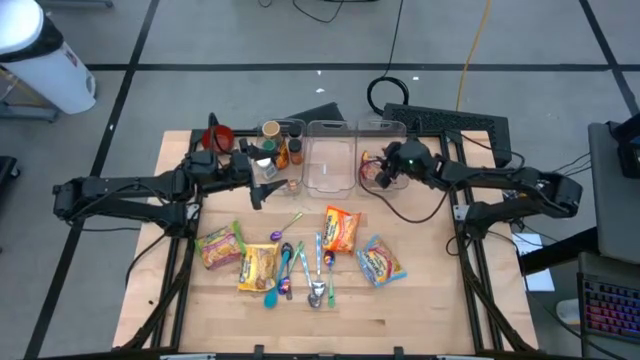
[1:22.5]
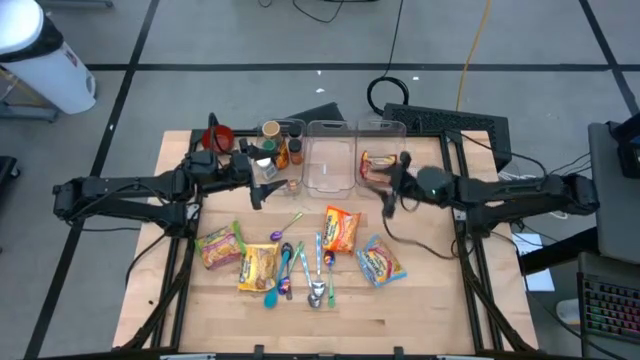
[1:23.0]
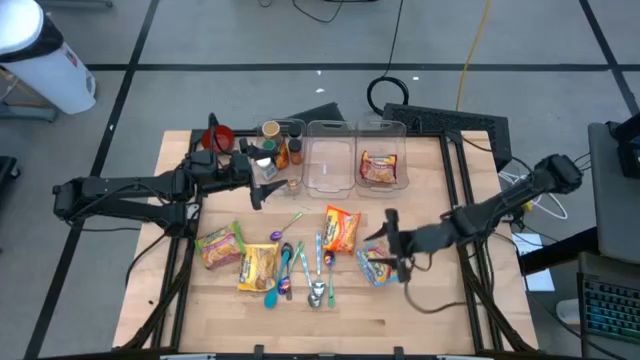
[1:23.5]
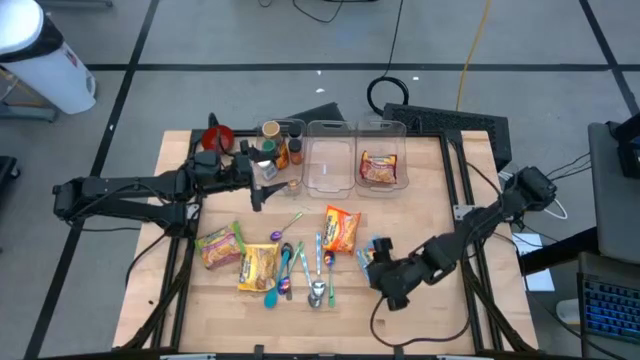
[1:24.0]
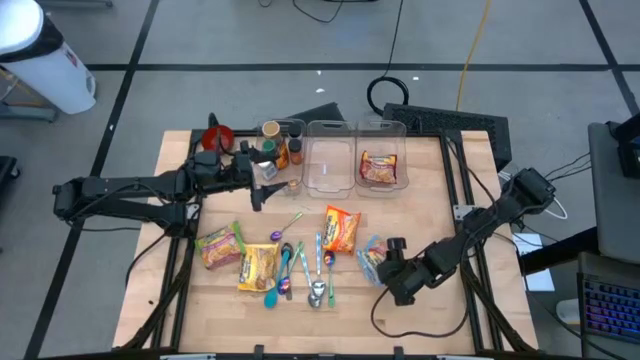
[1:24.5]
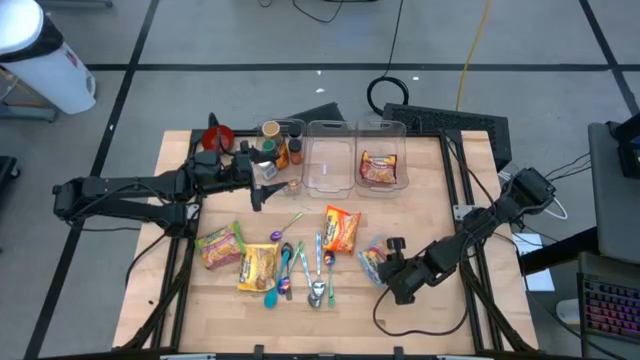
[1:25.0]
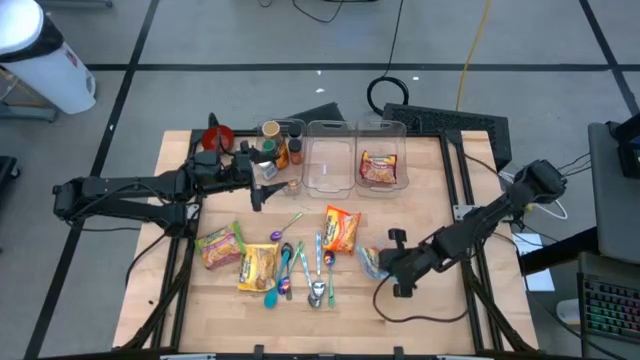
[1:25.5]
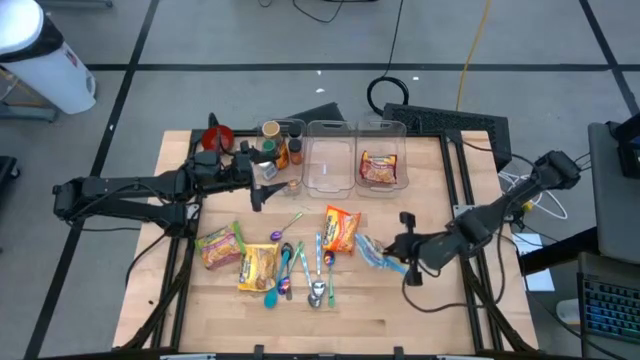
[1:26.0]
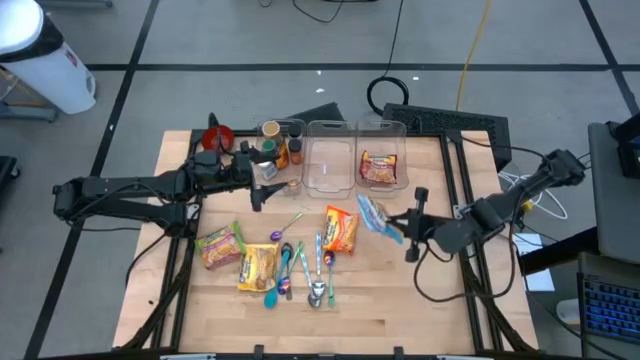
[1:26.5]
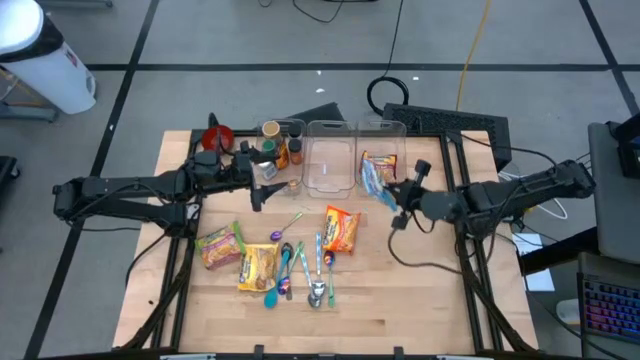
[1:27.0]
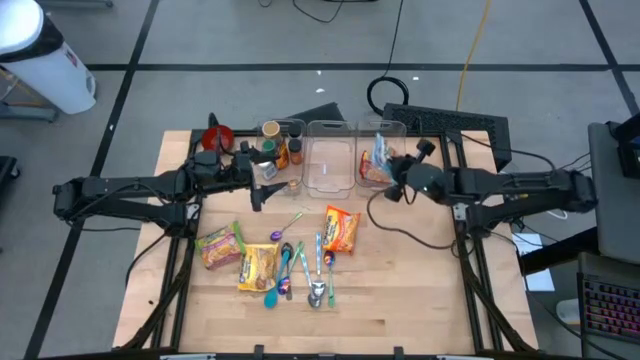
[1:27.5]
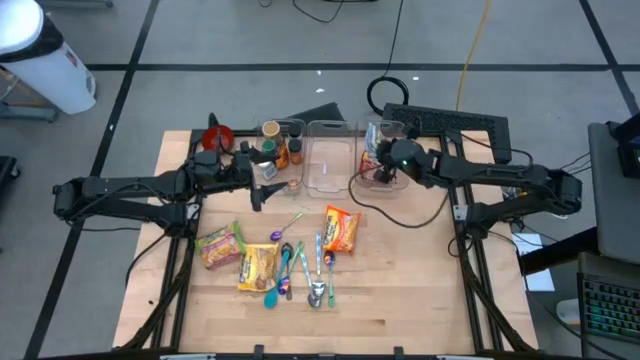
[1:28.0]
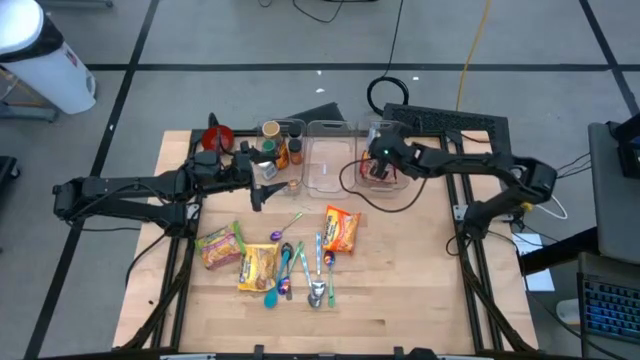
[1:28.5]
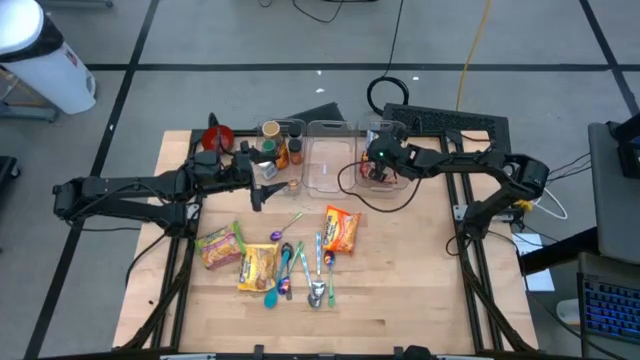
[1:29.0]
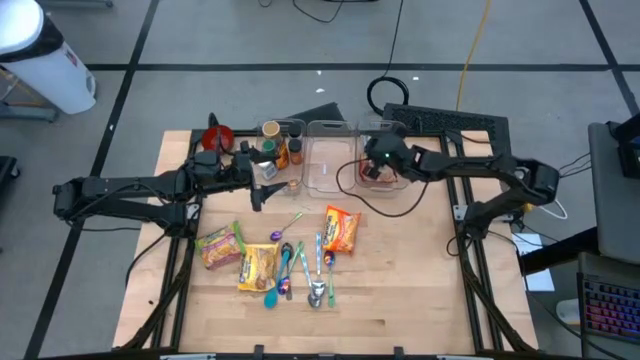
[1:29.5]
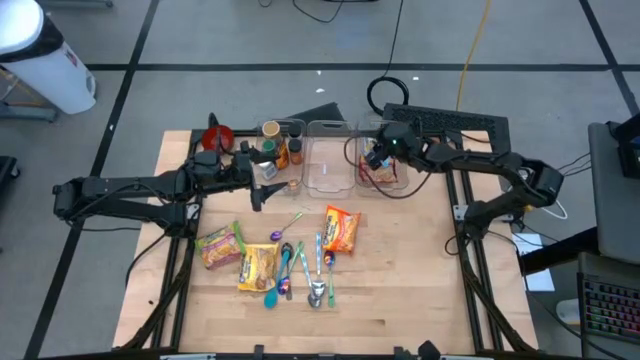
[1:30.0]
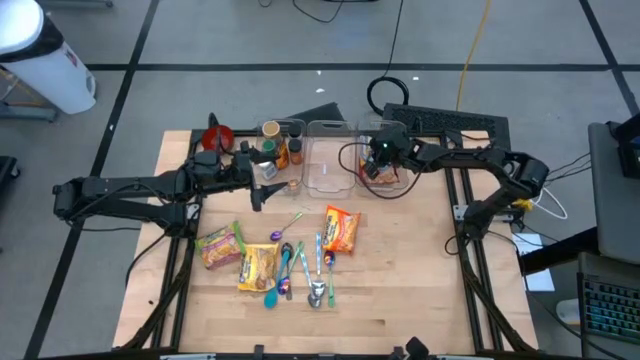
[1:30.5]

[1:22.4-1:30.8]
Task: Pick & Place Food Item
Put the blue noodle pack into the right transparent bin

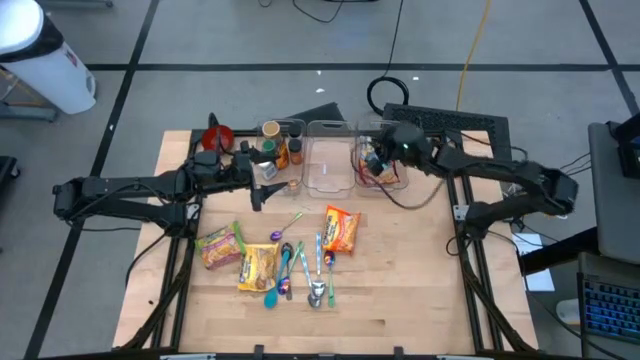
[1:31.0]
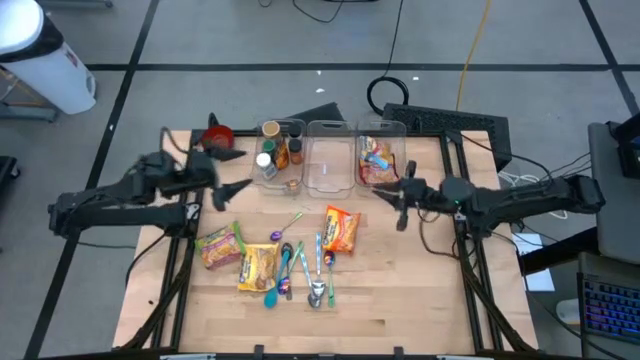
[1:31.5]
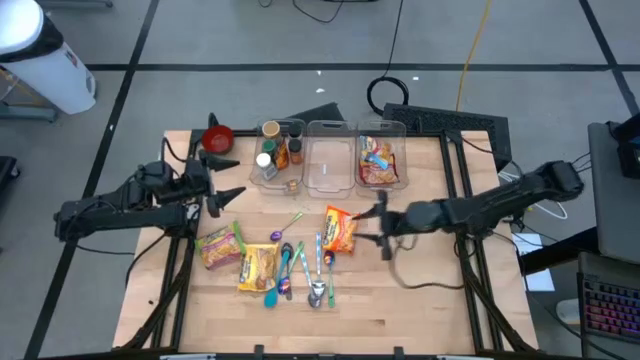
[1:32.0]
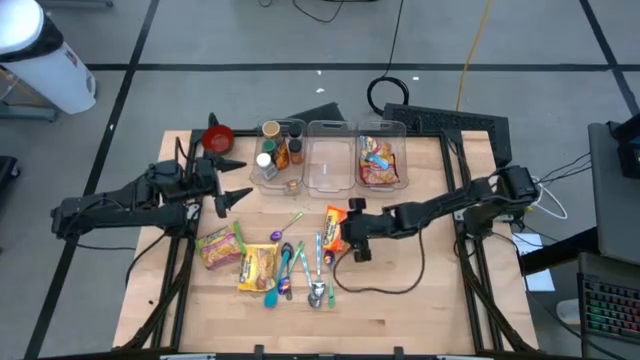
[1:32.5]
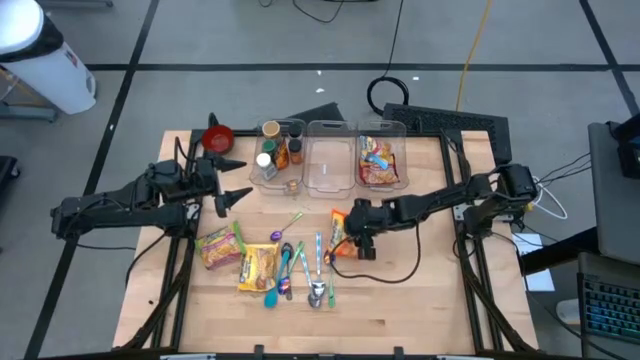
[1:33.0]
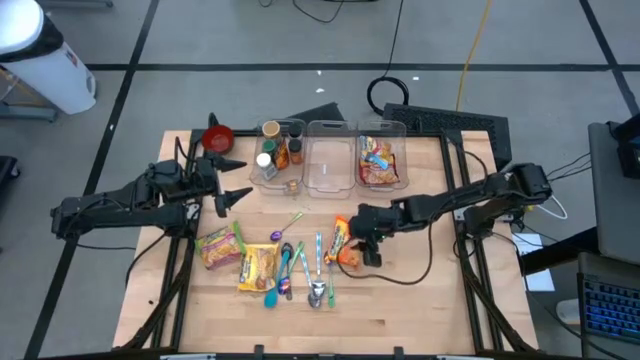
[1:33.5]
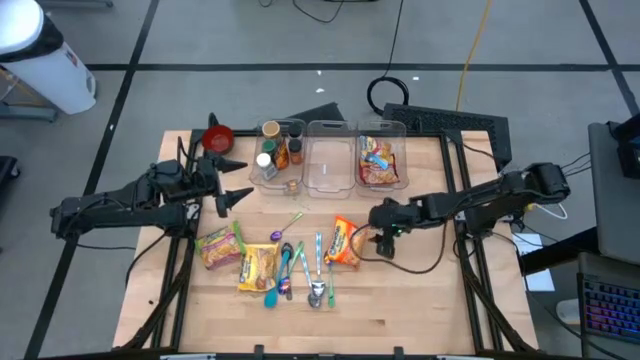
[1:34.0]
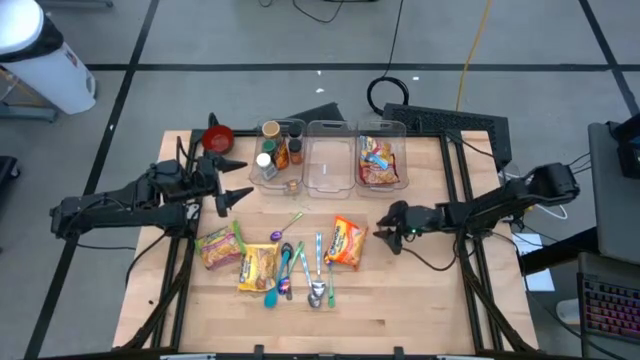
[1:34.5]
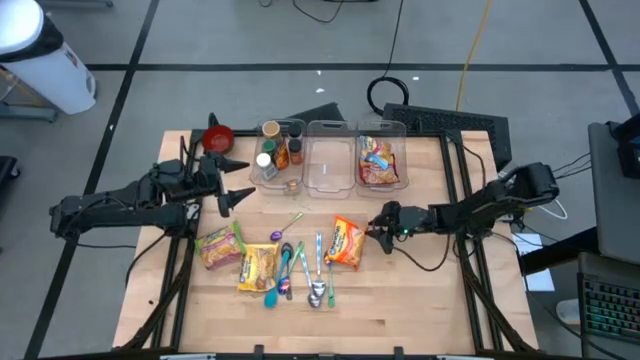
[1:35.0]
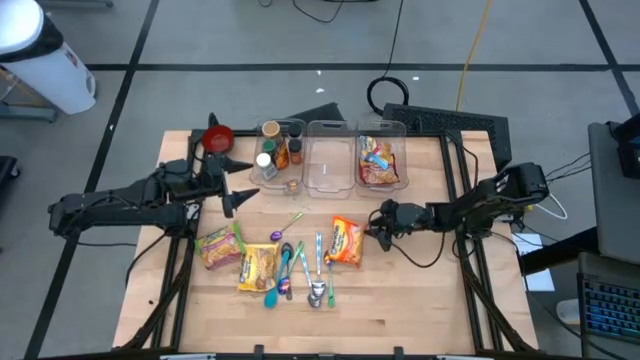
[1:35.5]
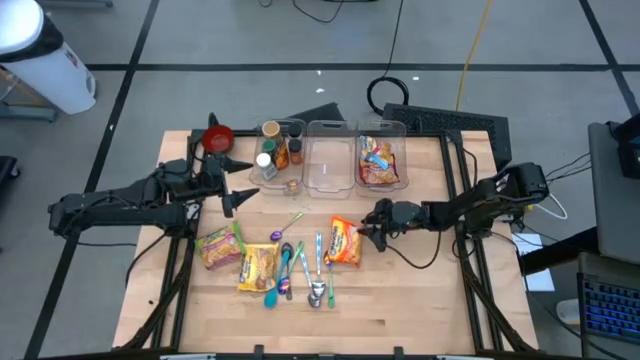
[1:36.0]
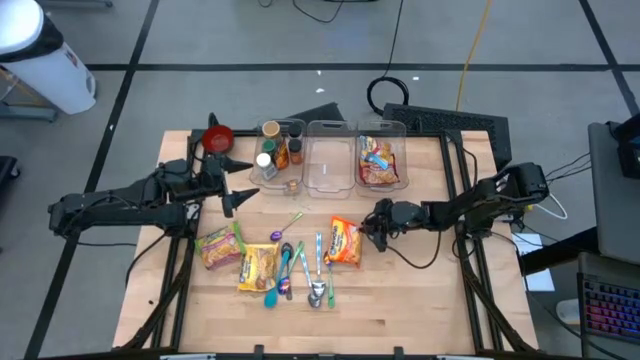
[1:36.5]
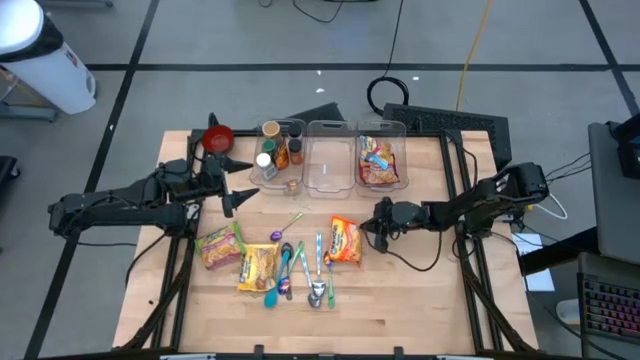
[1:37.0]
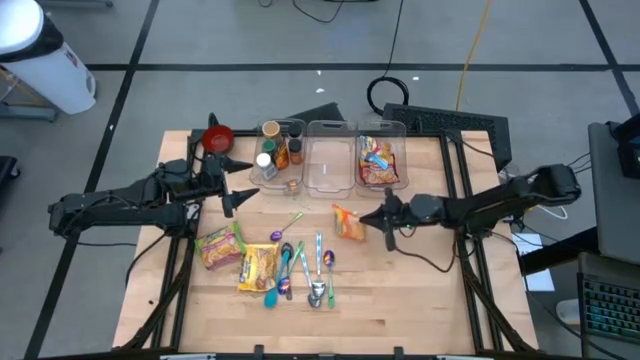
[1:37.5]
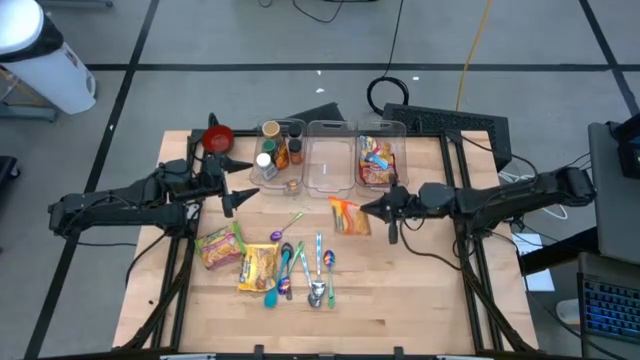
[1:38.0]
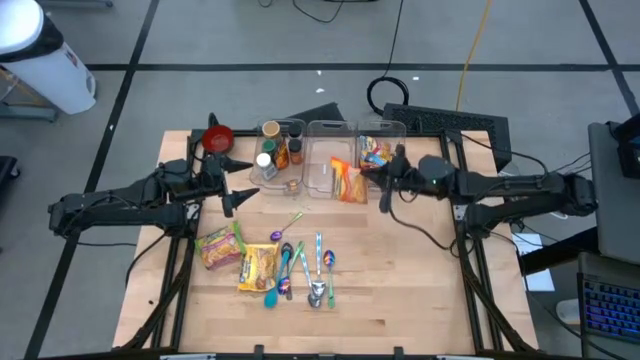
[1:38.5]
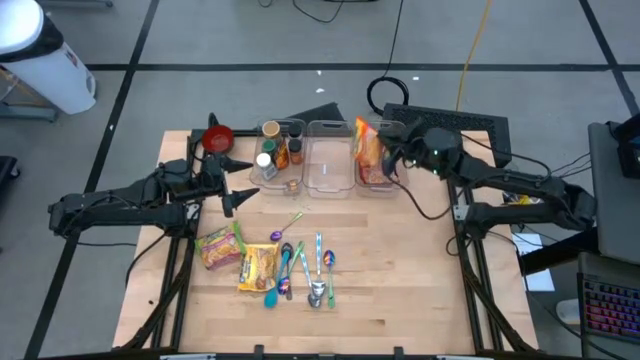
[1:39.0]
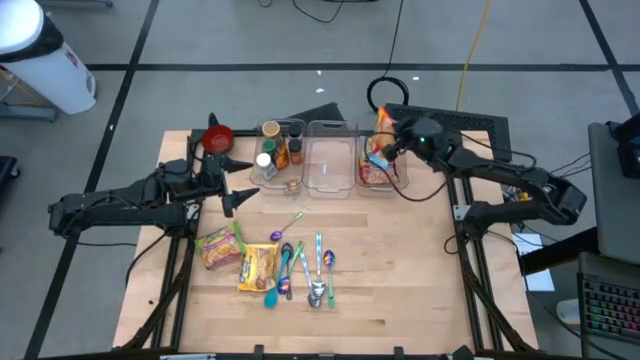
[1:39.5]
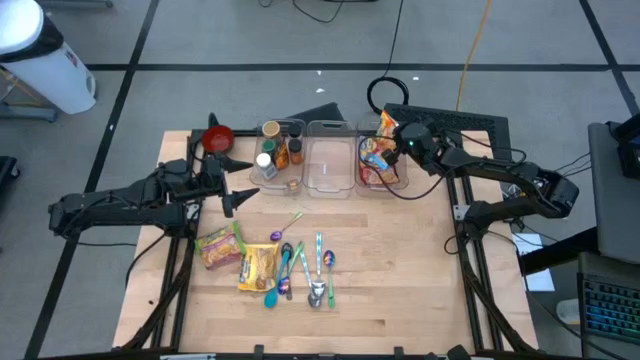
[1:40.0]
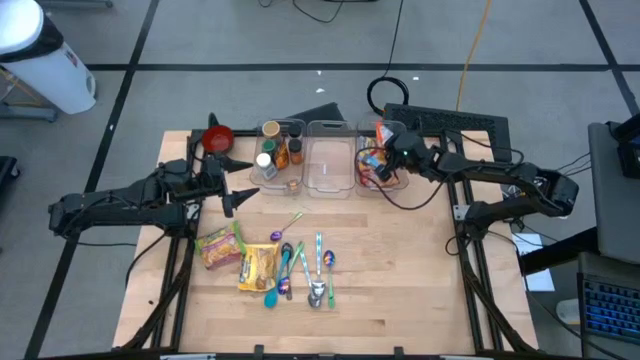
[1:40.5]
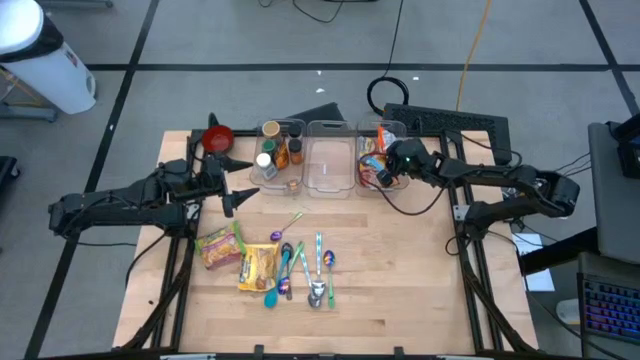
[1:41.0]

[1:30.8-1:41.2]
Put the orange noodle pack into the right transparent bin
